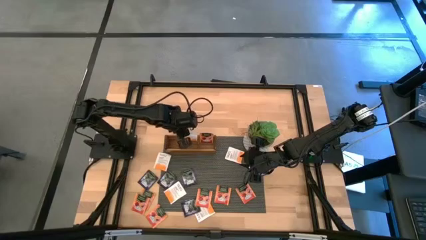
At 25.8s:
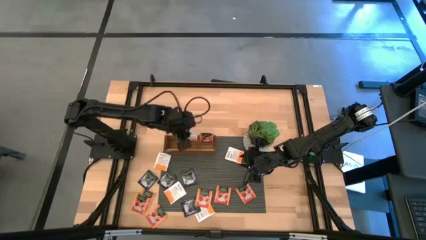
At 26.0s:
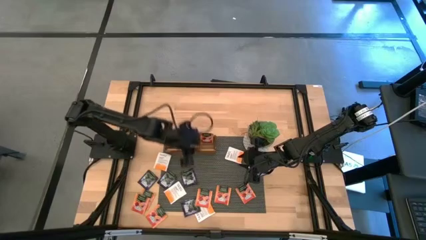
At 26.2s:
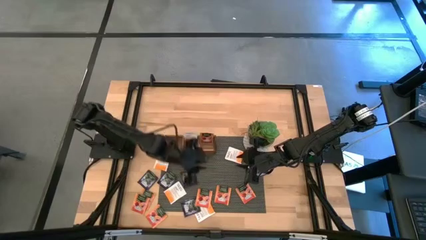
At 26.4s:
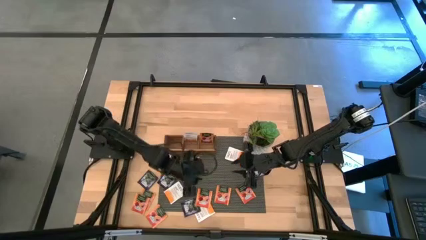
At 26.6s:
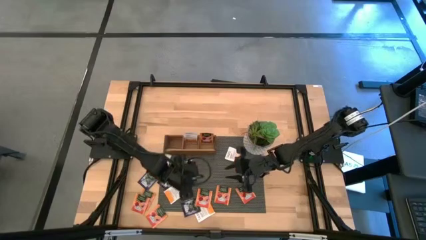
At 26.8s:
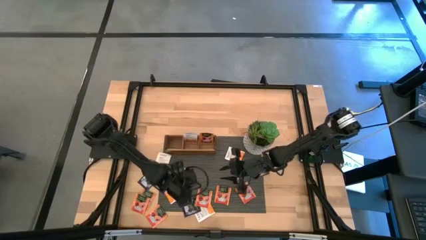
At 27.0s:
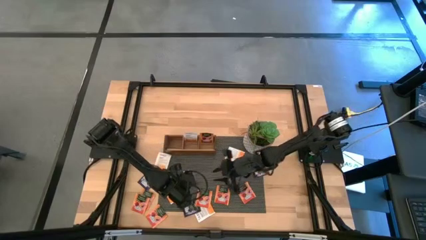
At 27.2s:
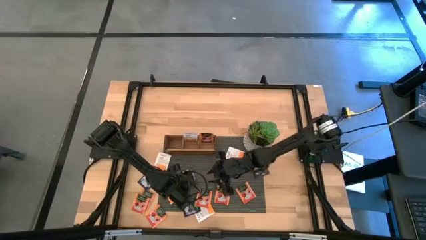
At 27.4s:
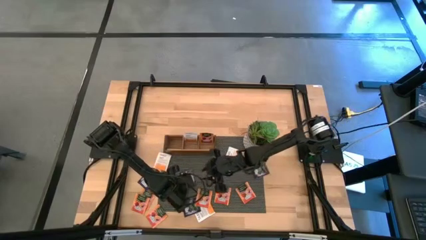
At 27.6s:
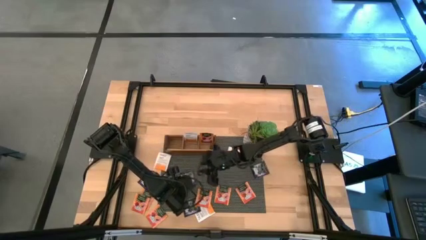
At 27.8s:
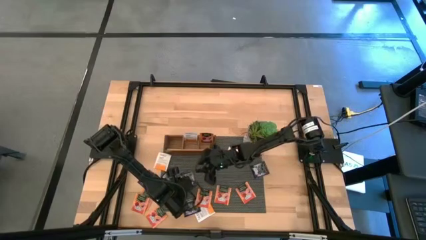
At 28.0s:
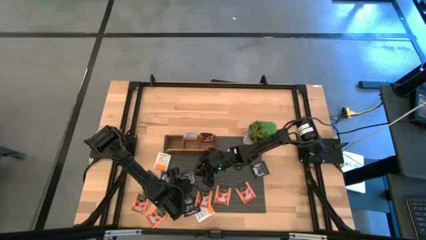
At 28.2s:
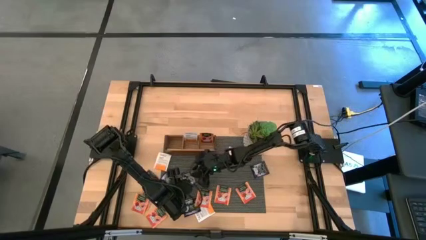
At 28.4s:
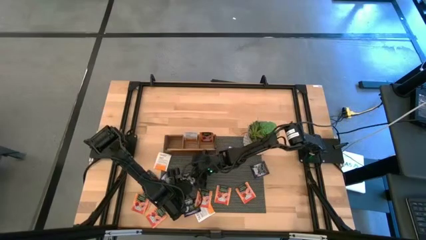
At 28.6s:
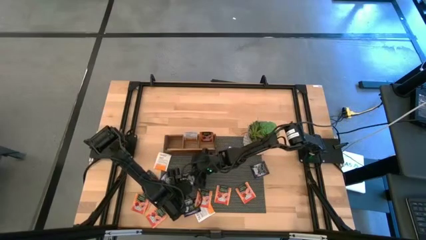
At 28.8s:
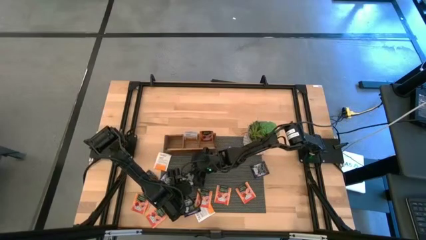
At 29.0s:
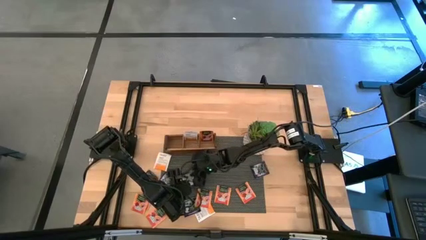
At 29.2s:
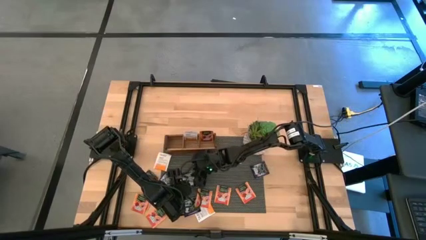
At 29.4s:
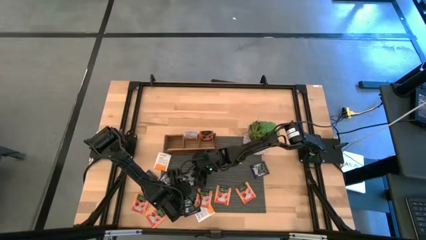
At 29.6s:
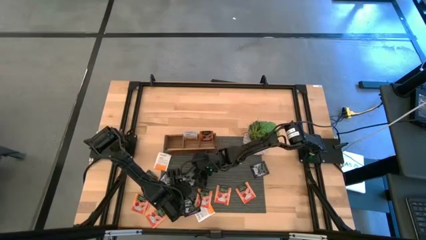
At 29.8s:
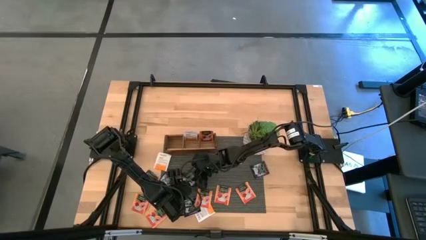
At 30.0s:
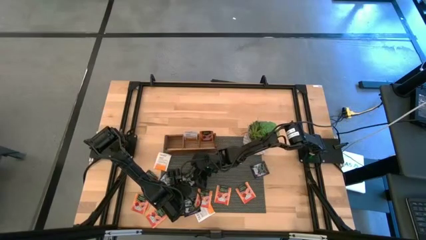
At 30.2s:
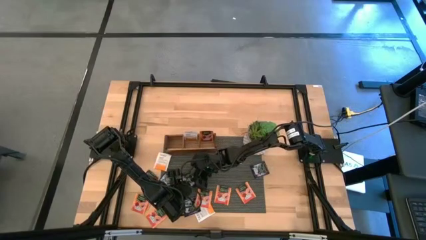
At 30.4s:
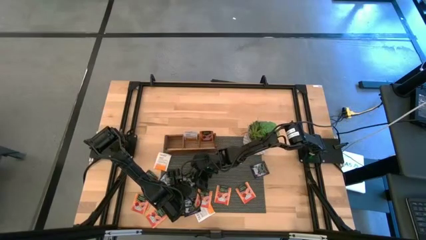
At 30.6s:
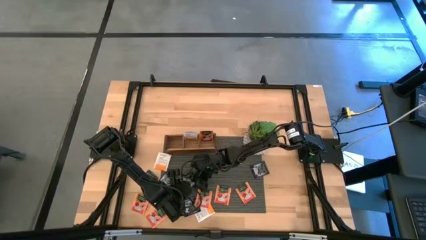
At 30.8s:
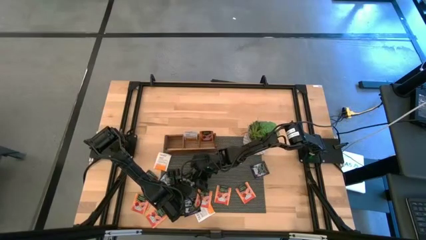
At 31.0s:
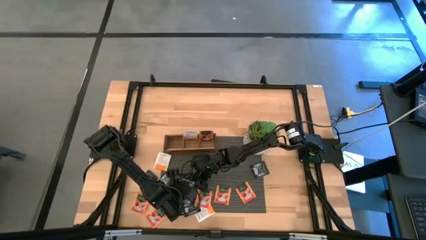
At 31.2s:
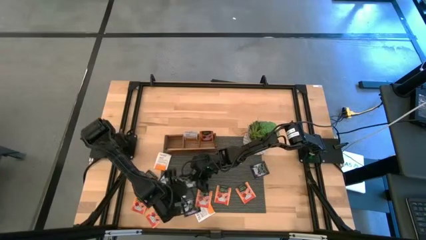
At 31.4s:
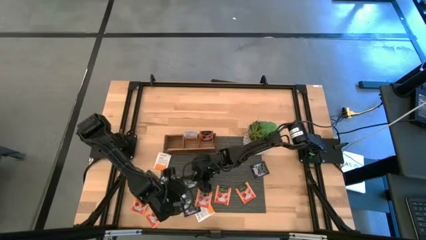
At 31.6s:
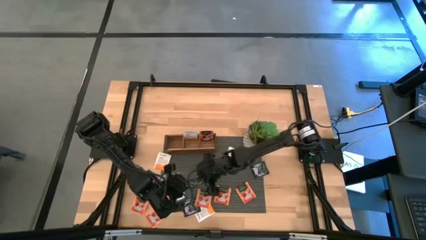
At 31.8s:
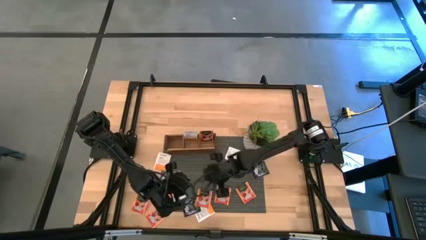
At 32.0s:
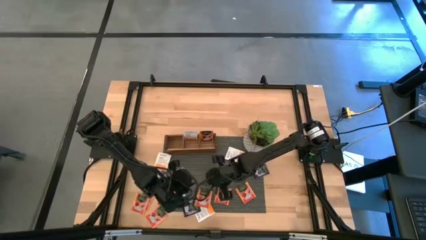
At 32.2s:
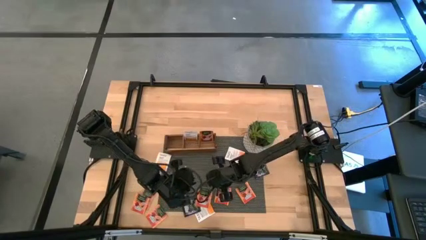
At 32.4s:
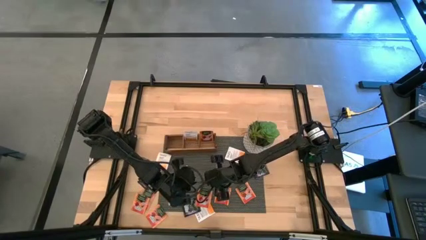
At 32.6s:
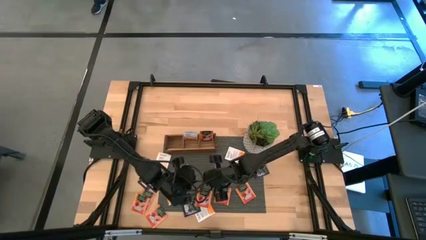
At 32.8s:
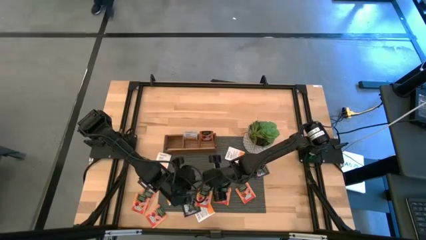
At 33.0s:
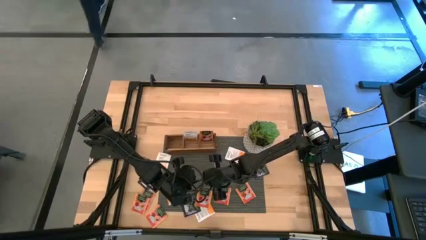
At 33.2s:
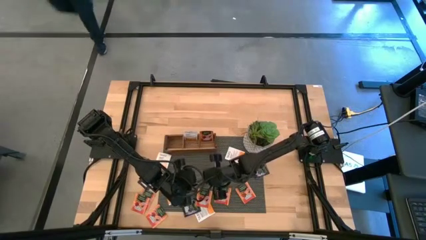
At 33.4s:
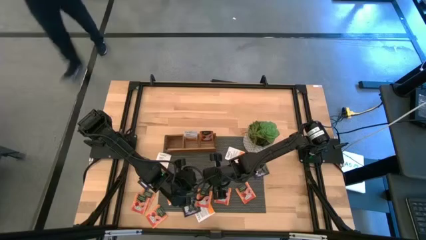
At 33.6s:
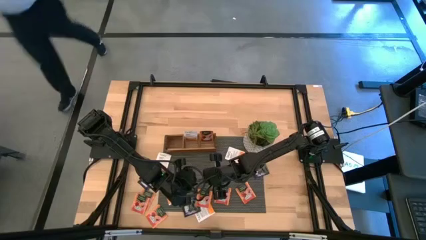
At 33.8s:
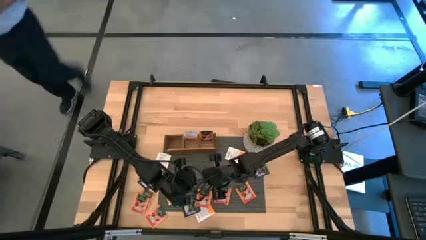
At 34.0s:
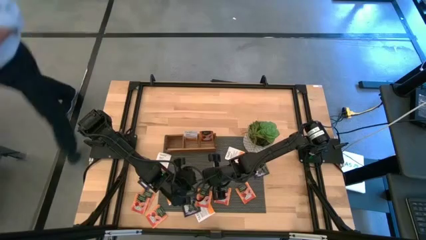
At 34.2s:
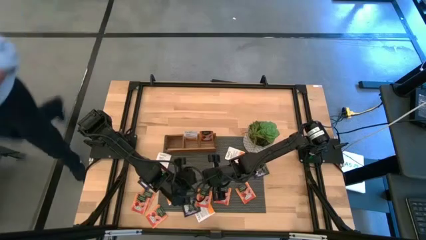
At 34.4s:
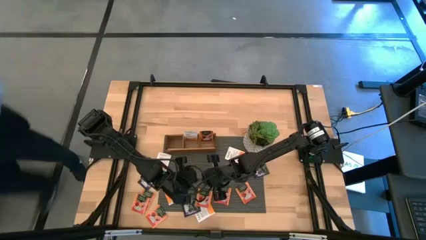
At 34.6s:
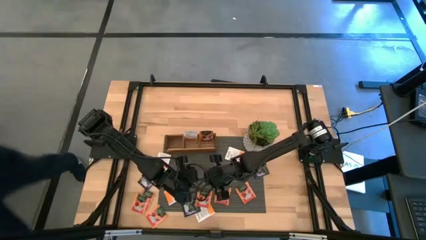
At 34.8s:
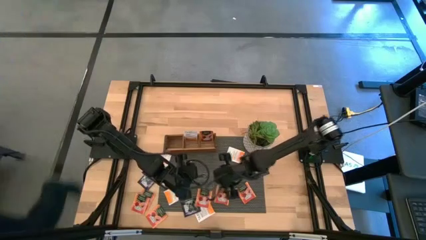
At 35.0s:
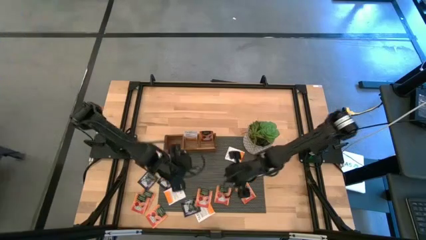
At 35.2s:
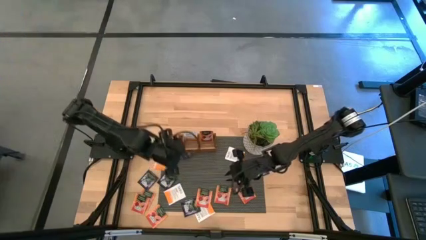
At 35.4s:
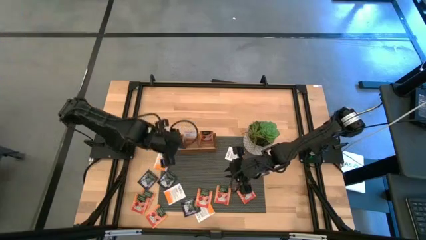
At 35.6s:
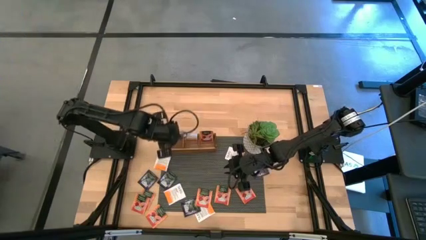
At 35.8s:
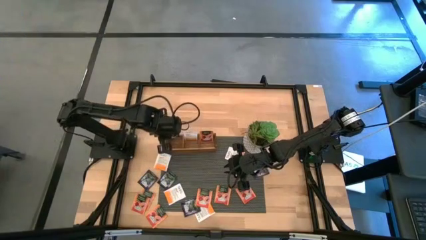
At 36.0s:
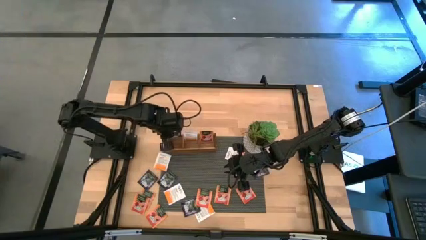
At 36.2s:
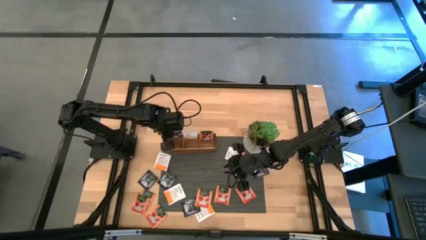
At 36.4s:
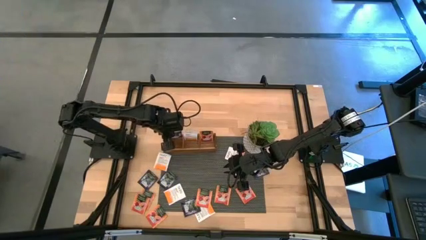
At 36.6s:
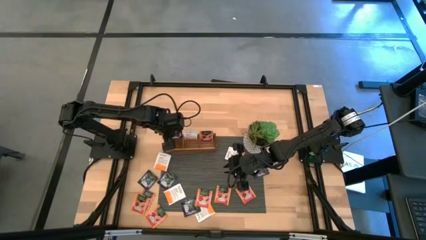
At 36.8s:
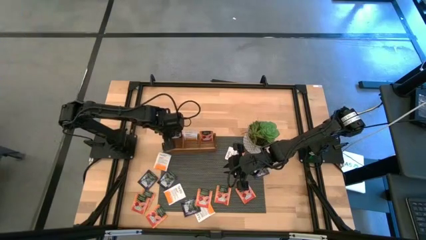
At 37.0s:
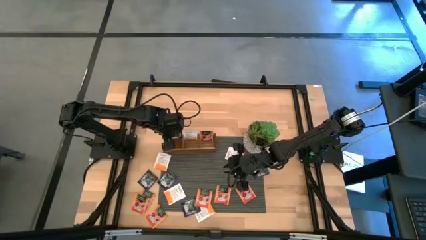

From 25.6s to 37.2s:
Task: Pick & Place Tea
Put the violet tea bag to the left section of the wooden organizer

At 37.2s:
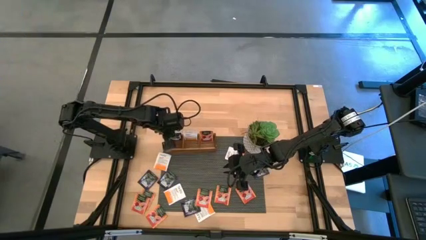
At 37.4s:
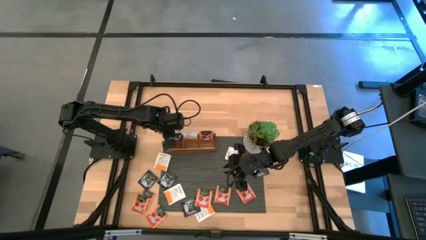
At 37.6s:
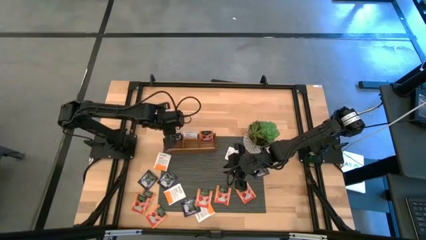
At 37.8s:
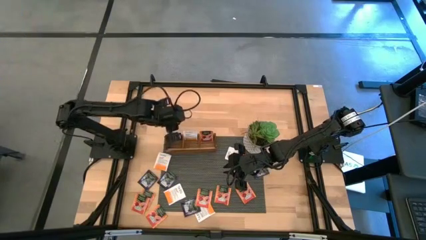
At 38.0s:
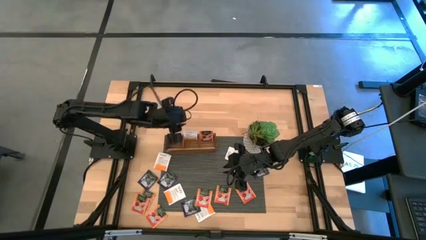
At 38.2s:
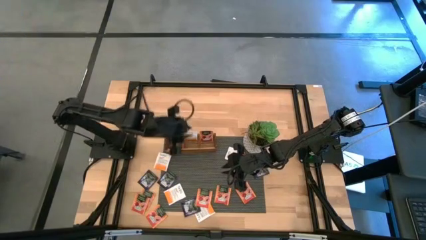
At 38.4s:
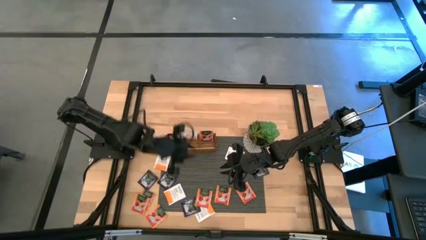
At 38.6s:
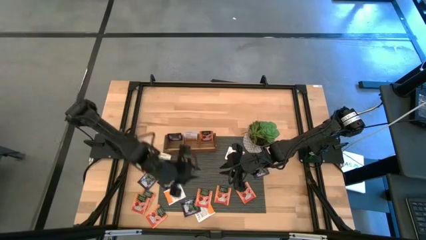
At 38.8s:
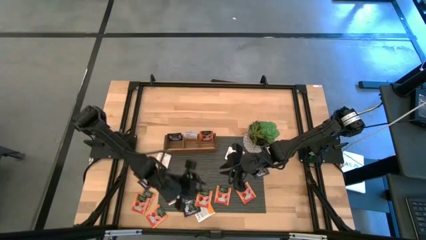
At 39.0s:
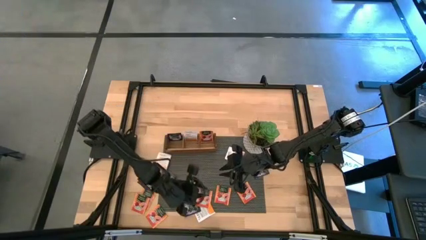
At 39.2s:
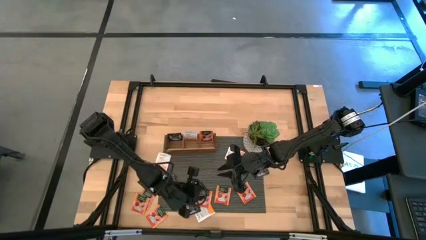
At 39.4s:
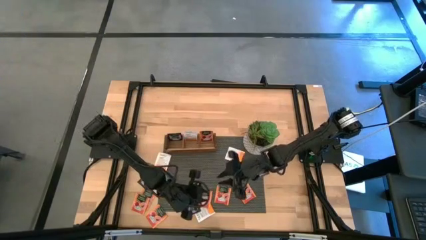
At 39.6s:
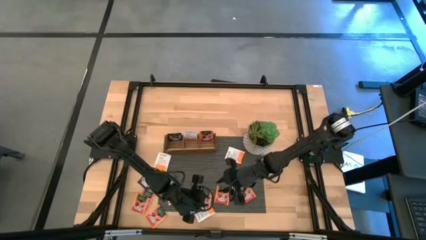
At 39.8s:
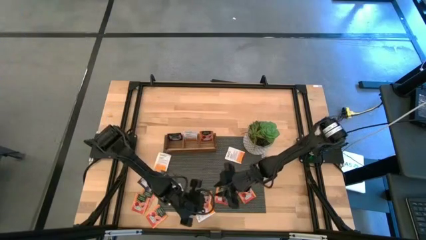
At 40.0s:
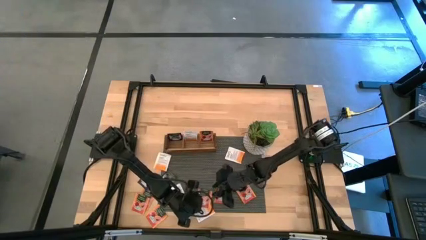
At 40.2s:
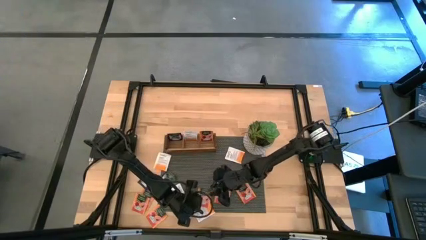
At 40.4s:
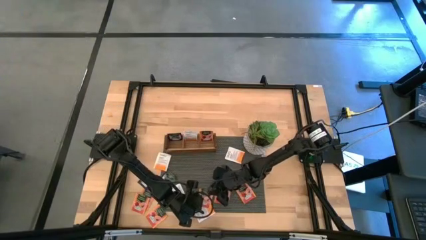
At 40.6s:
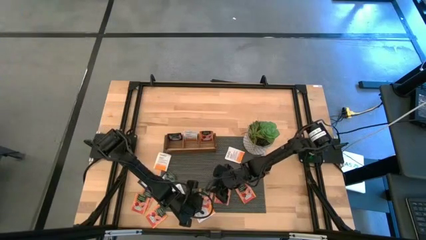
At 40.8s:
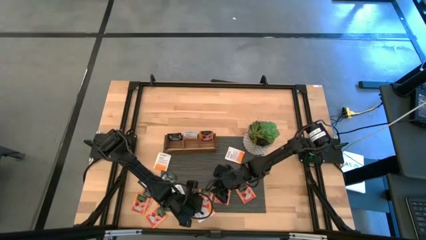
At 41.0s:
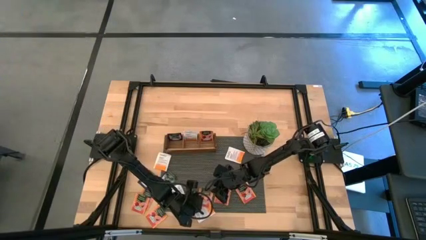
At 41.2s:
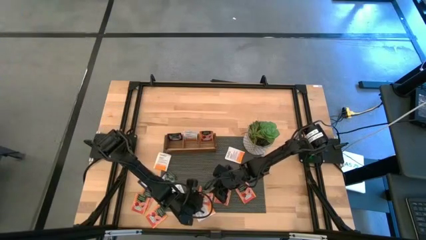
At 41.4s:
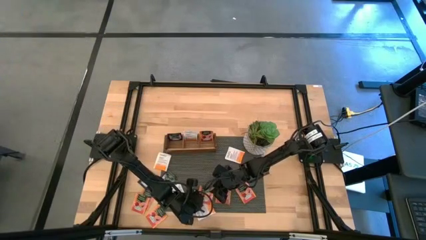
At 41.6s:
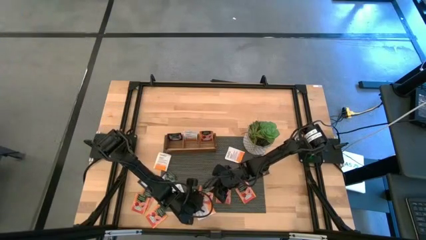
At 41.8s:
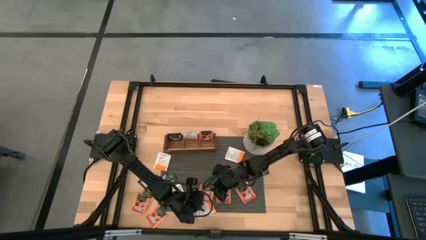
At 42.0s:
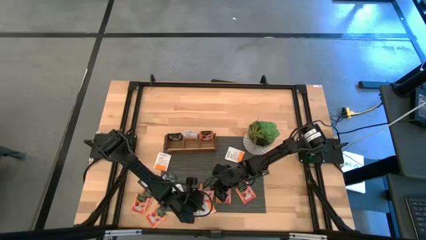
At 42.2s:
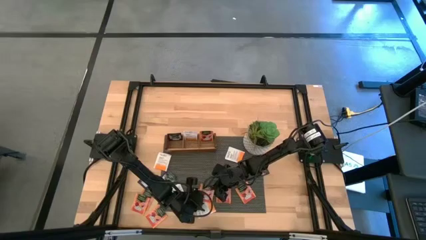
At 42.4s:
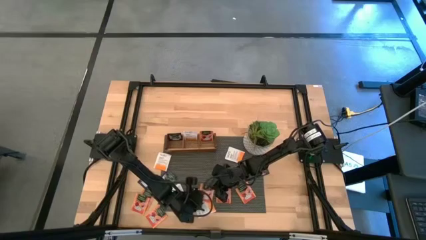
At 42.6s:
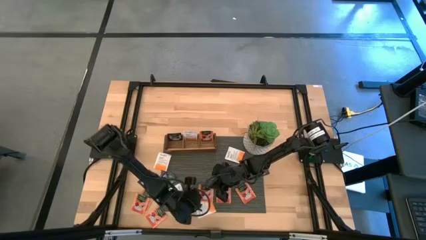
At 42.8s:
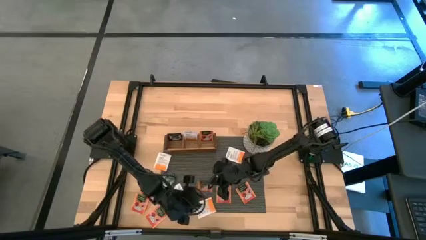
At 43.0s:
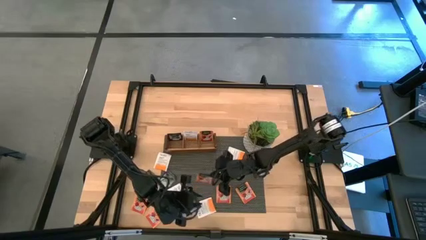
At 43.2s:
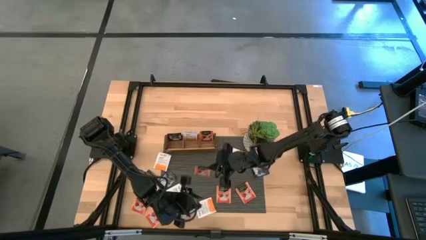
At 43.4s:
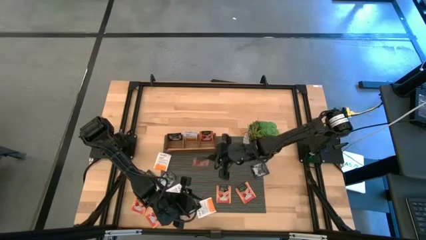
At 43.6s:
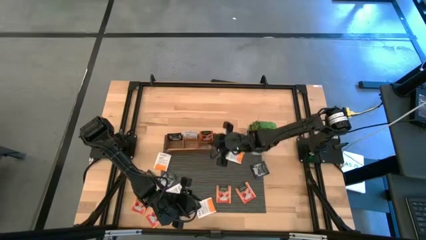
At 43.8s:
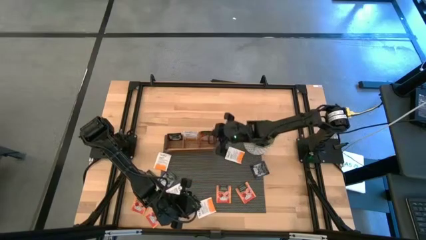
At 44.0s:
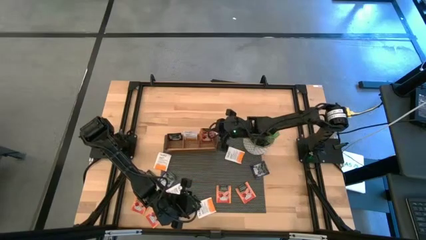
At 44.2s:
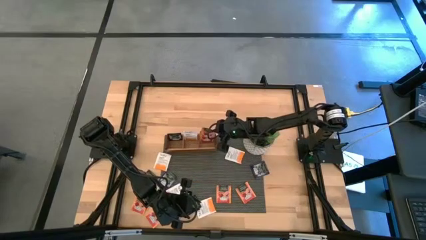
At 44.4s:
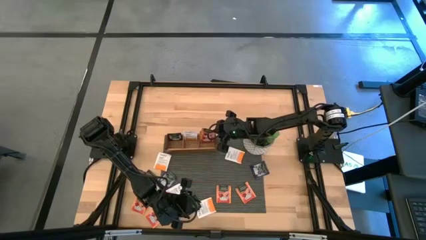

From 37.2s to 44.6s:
Put the orange tea bag to the right section of the wooden organizer
